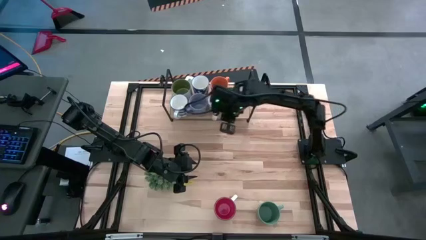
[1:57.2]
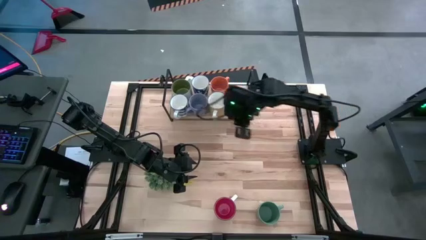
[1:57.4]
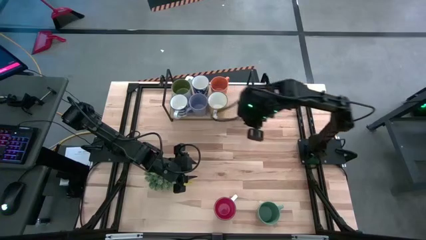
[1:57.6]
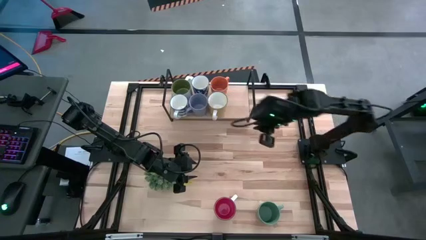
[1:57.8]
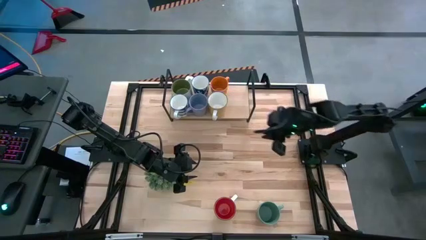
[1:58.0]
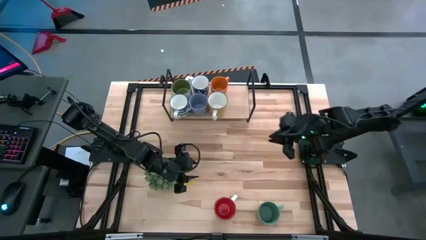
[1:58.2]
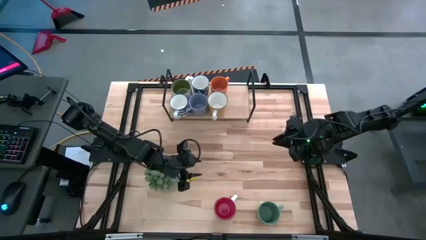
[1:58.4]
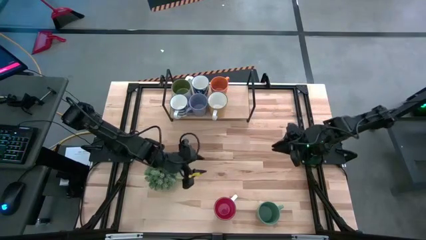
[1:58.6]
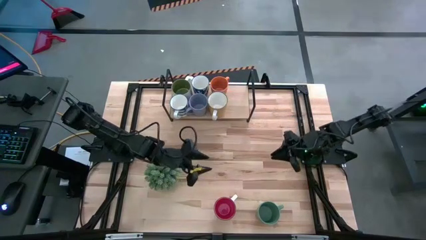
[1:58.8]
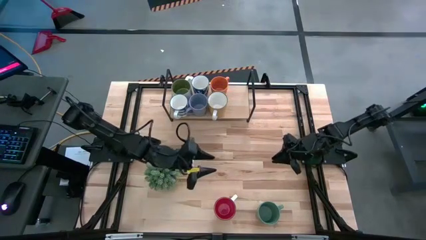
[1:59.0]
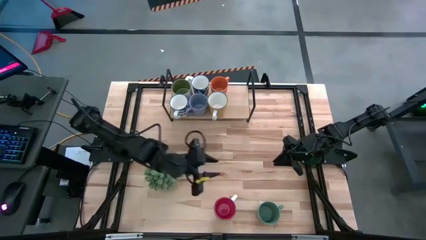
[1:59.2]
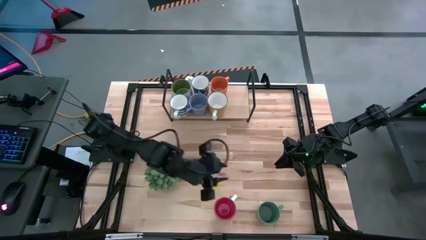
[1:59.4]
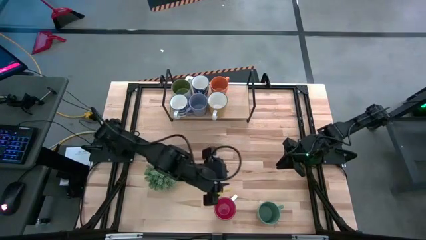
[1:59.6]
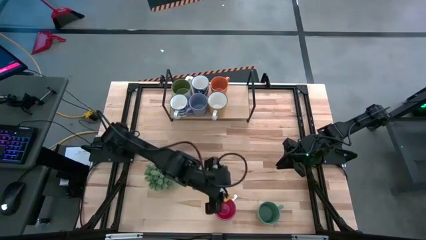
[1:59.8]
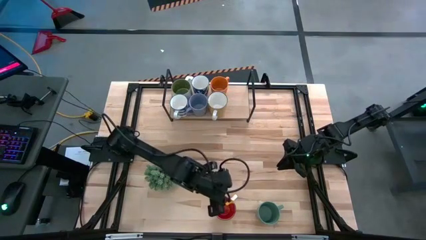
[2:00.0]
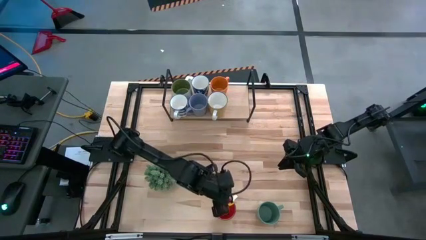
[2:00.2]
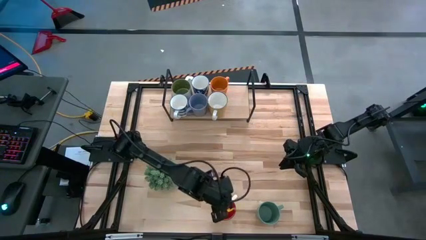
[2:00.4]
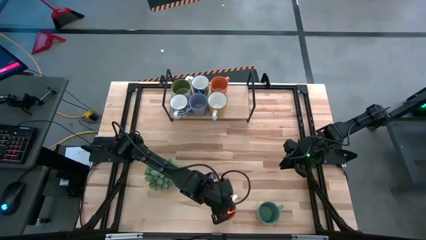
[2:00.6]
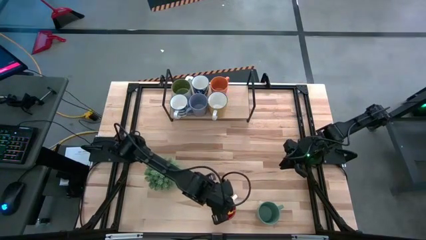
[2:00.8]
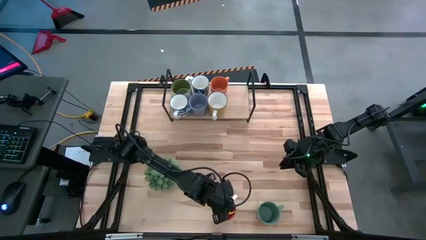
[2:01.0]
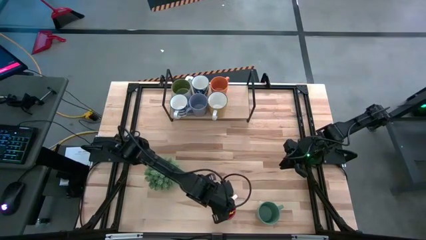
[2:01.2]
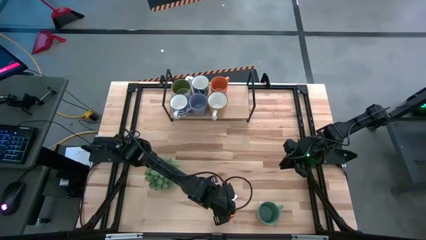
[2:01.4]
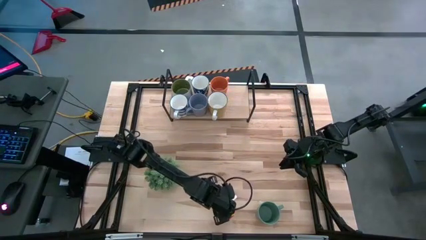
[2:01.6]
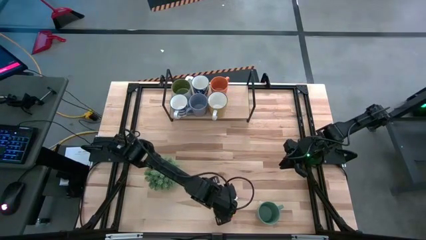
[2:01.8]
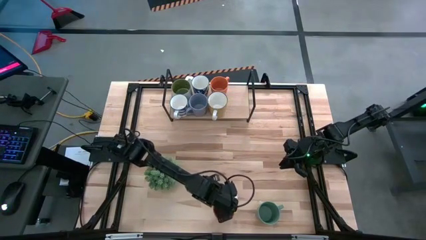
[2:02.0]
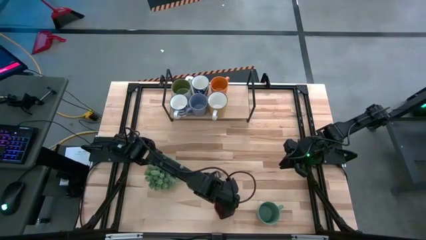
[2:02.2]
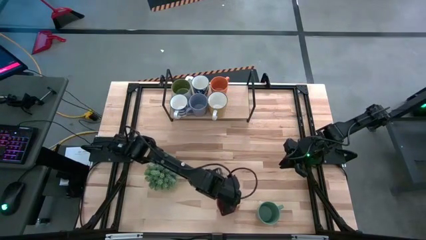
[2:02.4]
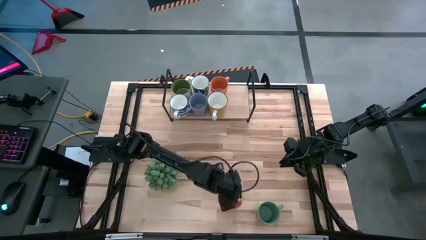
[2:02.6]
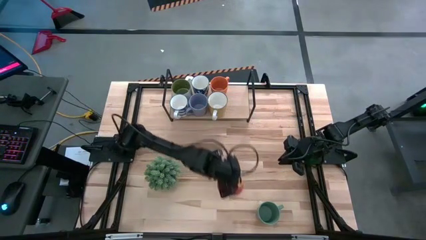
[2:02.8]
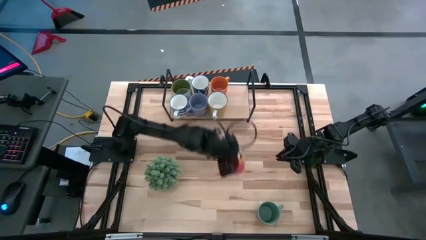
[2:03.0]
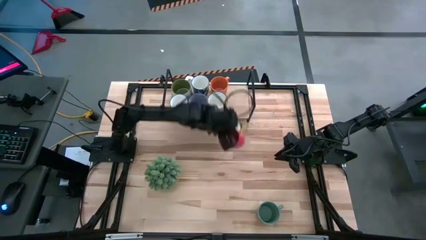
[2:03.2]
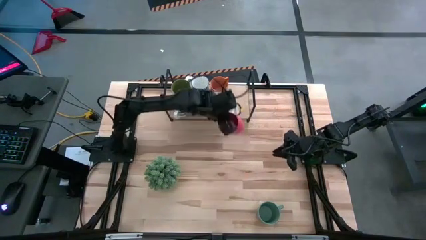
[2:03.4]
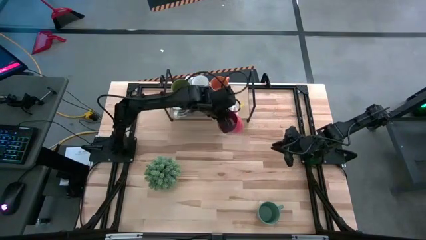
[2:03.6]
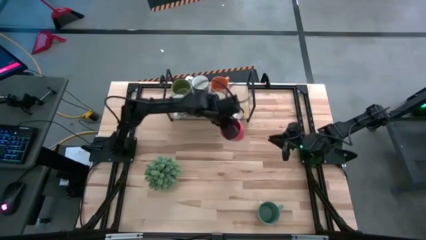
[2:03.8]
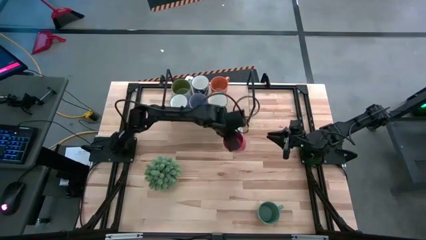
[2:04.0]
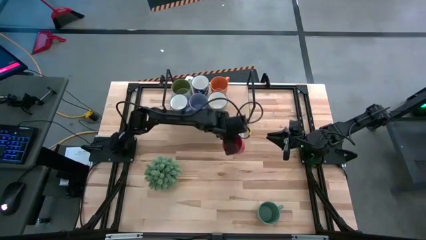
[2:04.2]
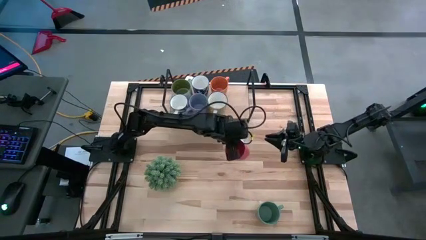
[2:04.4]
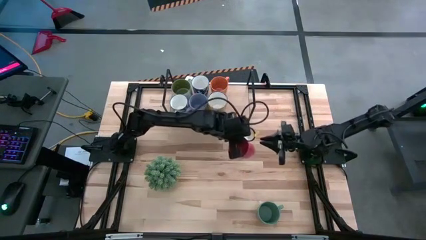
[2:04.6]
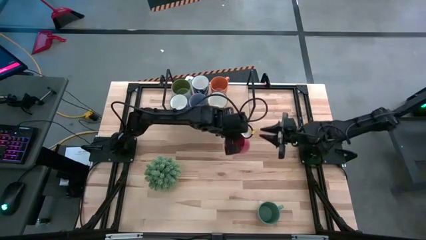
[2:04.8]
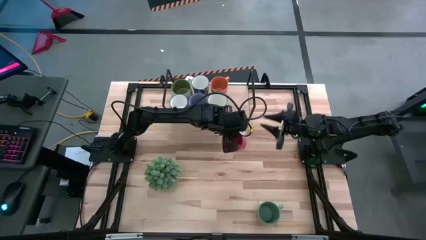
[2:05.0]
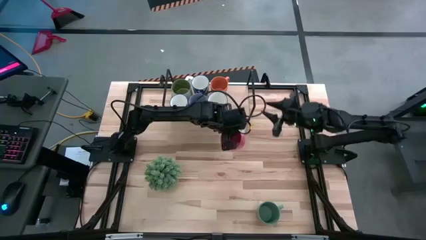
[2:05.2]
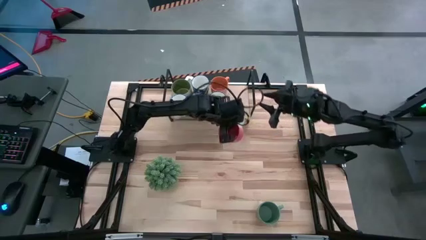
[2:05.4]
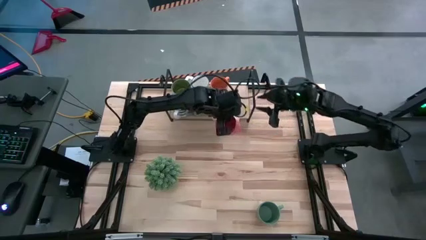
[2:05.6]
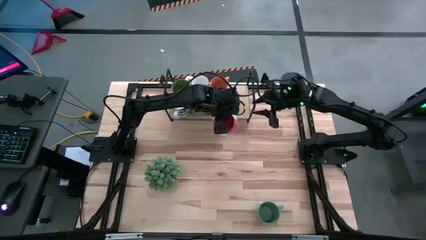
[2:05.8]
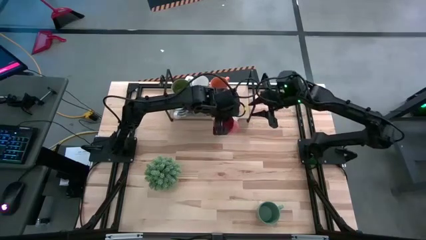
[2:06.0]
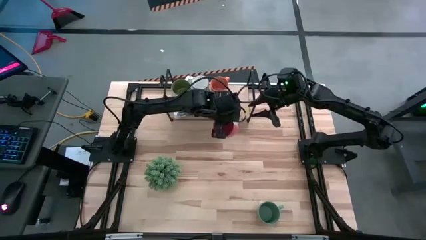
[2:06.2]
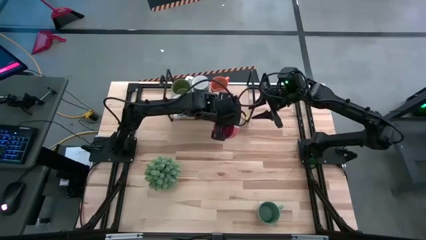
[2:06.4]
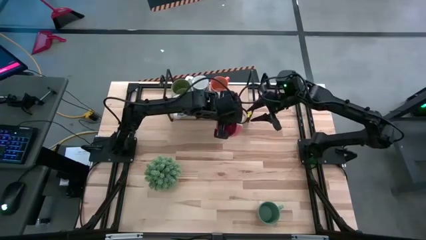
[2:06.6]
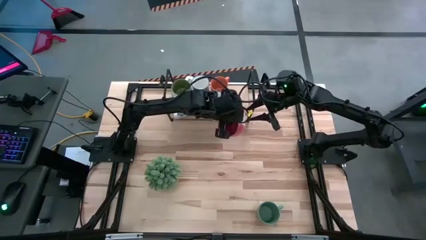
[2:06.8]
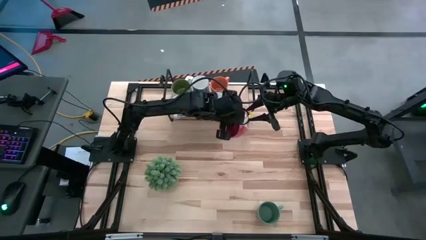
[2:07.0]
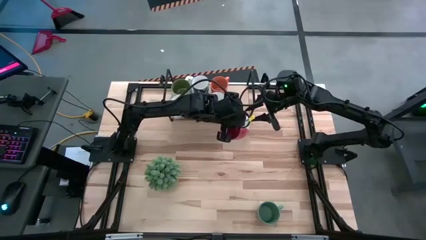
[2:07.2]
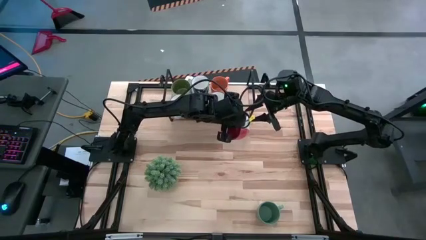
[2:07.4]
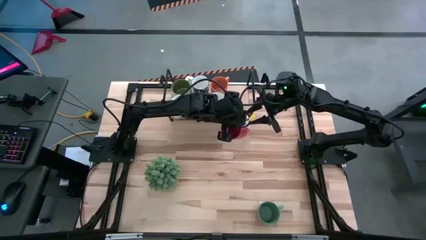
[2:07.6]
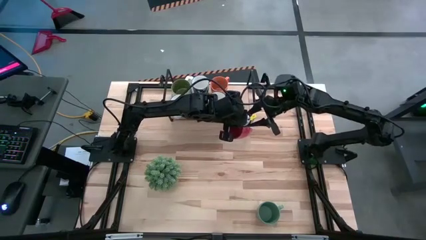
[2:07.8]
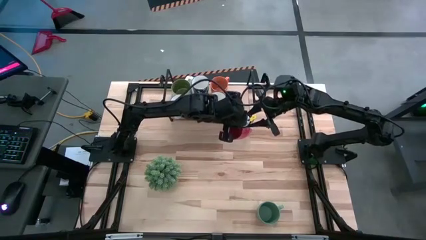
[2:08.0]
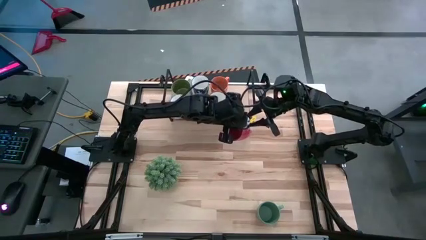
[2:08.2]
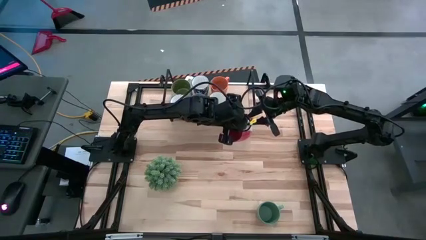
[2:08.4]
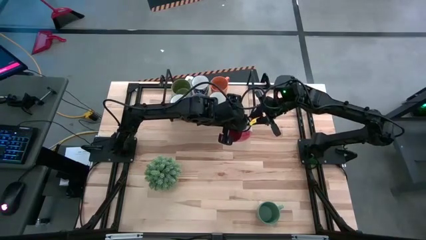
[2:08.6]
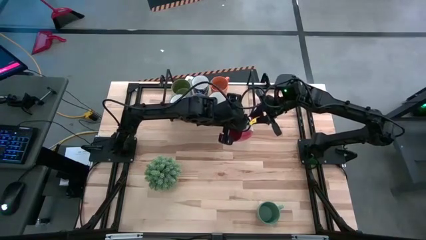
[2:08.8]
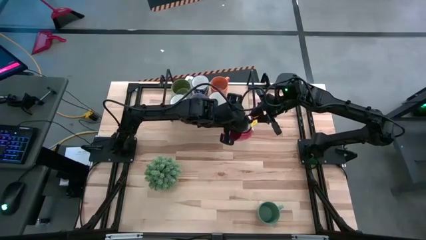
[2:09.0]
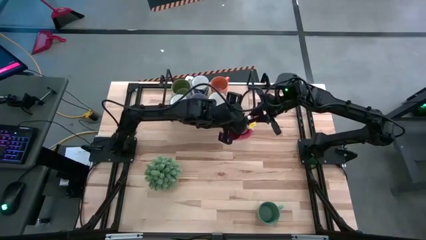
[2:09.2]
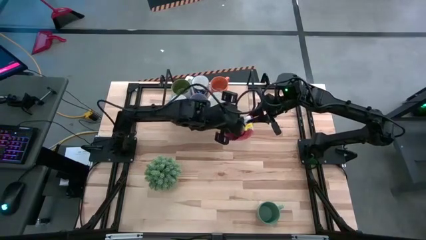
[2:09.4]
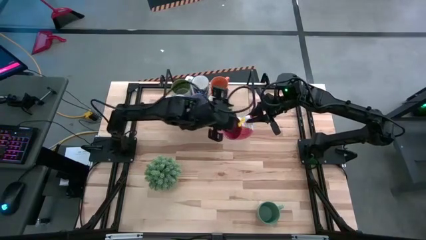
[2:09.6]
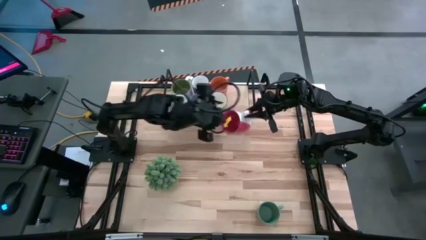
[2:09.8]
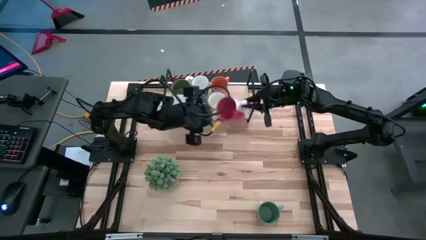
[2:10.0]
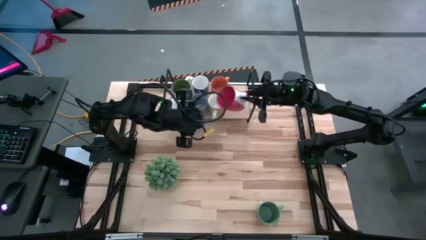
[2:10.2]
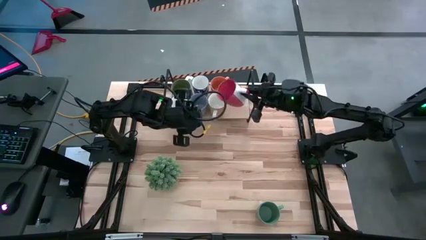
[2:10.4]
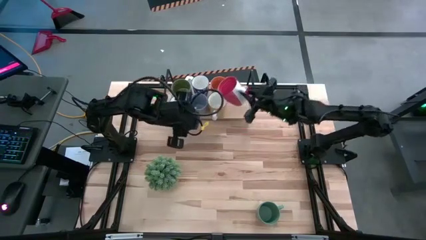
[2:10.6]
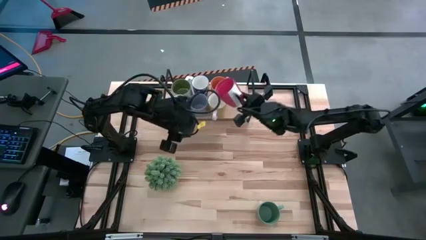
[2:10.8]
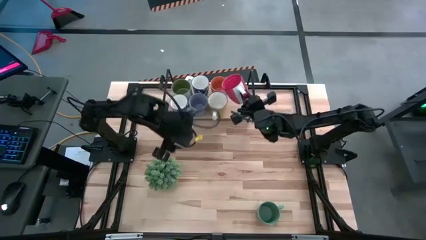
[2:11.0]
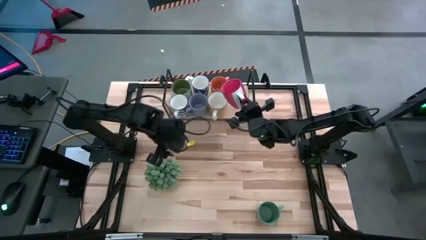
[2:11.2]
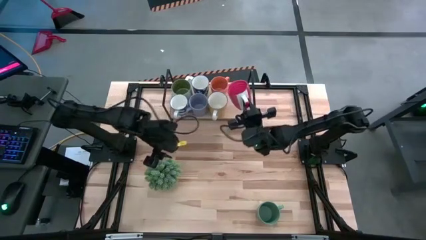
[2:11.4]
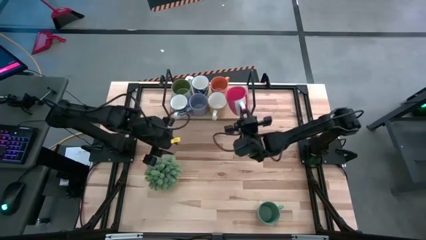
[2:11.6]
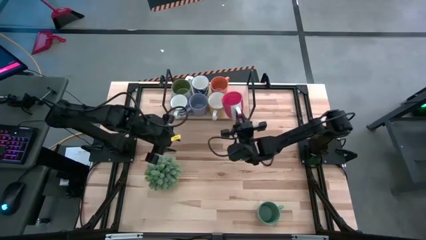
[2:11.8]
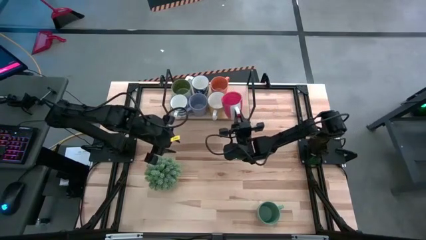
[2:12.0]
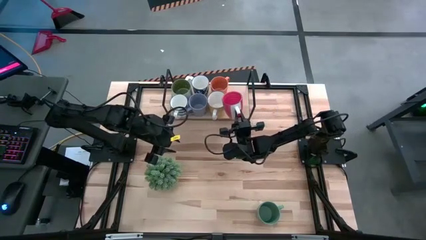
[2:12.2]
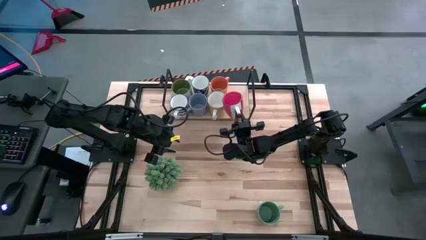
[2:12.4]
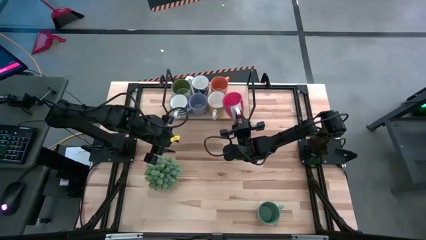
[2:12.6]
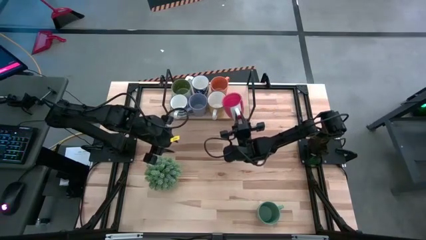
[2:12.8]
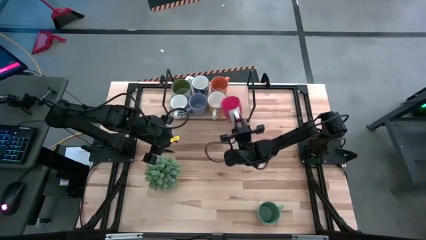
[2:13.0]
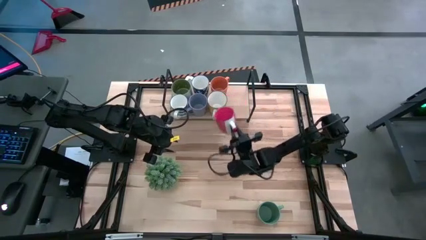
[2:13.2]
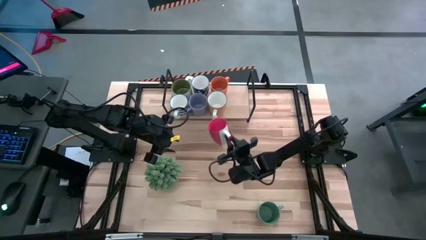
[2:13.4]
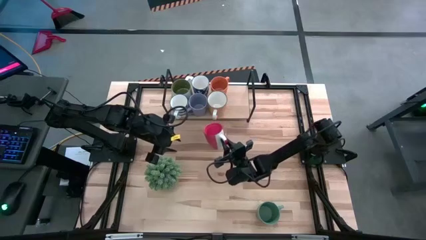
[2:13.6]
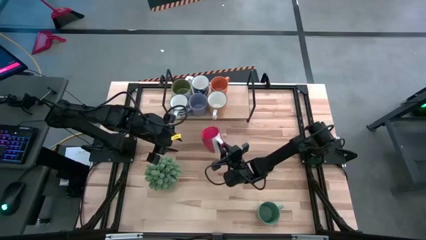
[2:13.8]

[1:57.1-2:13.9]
Task: Place coffee mugs
Put the red mug on the shelf
